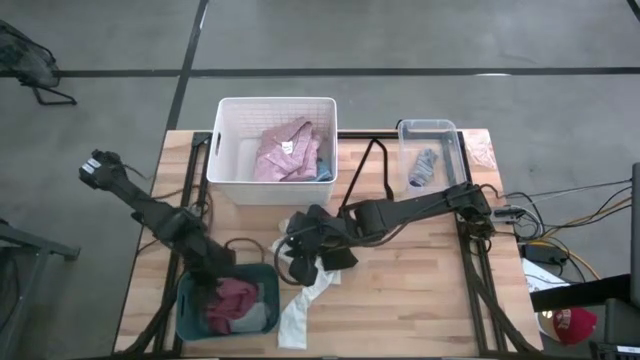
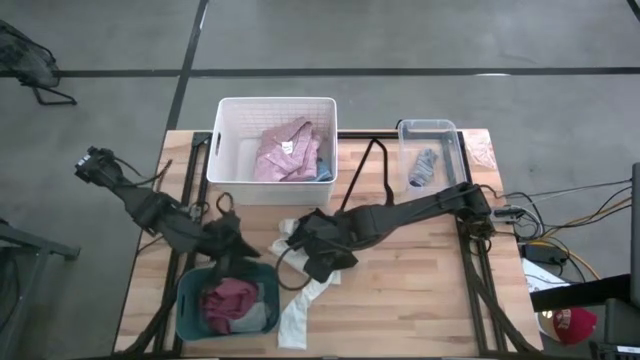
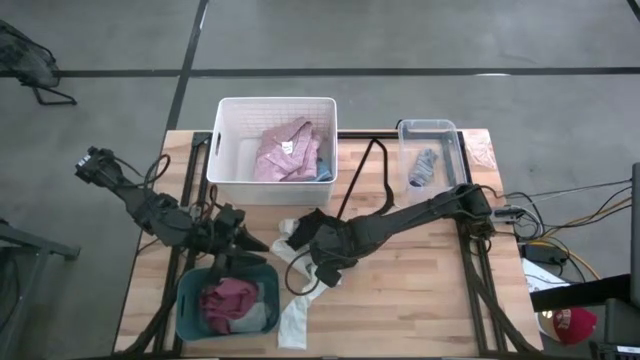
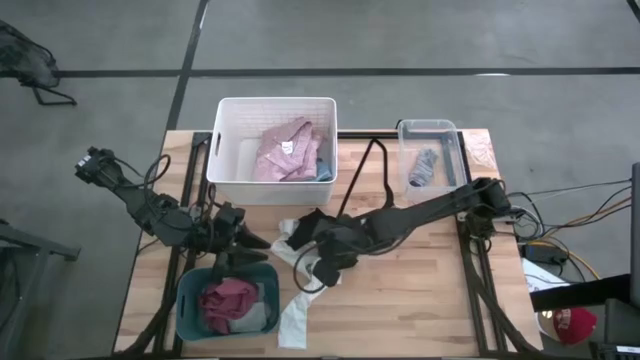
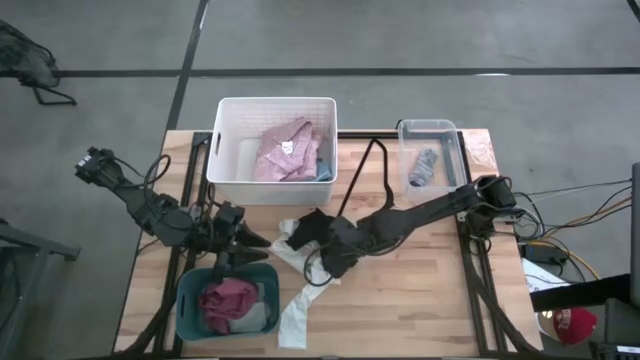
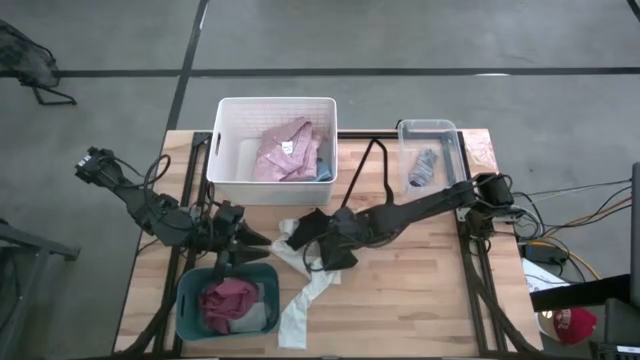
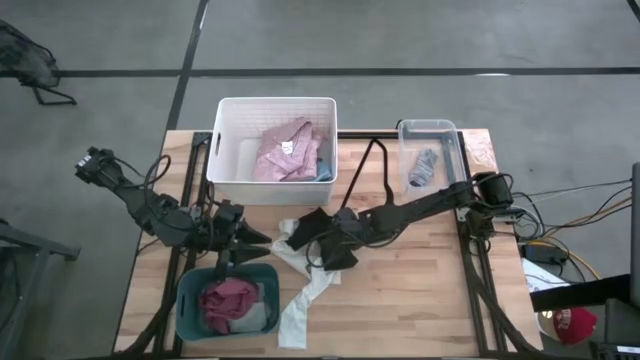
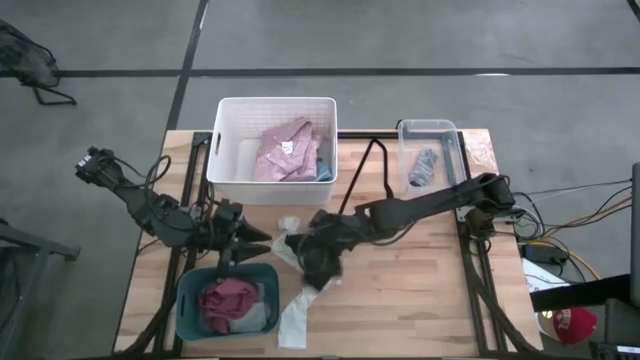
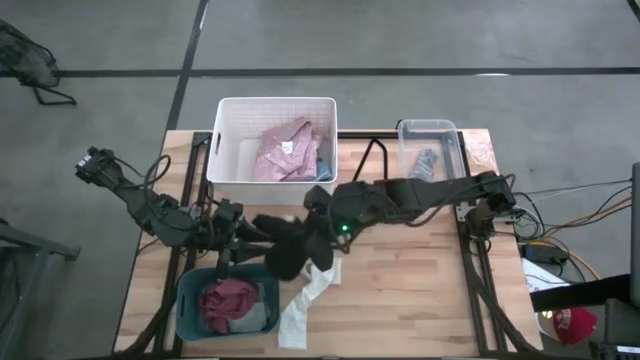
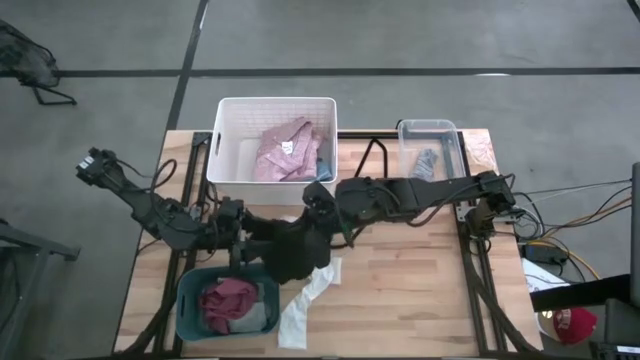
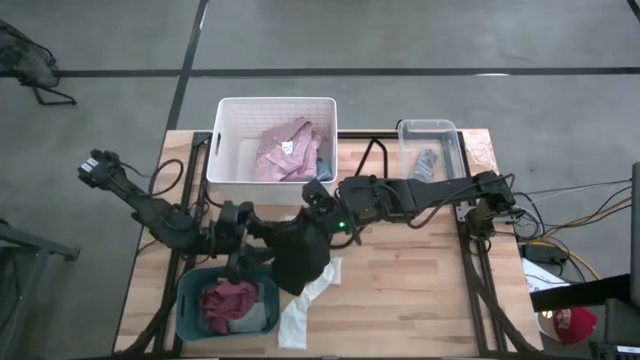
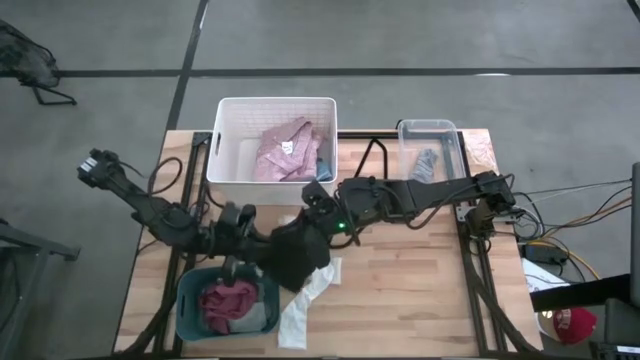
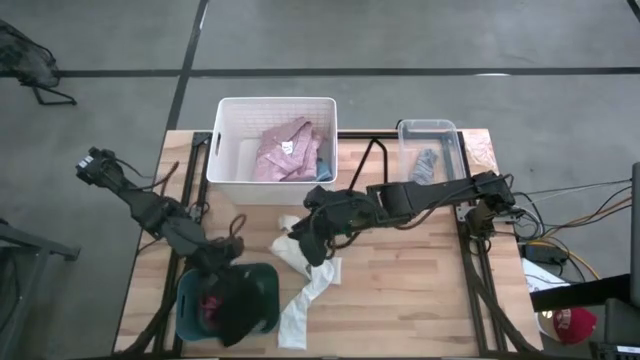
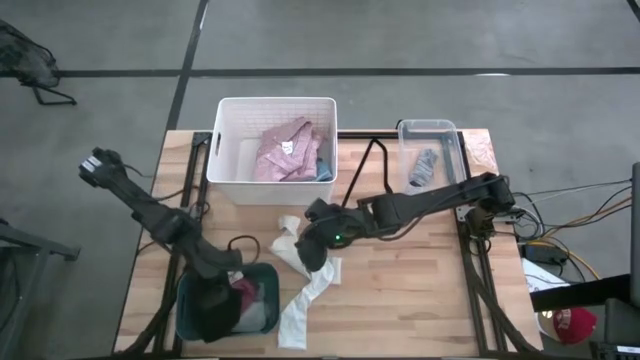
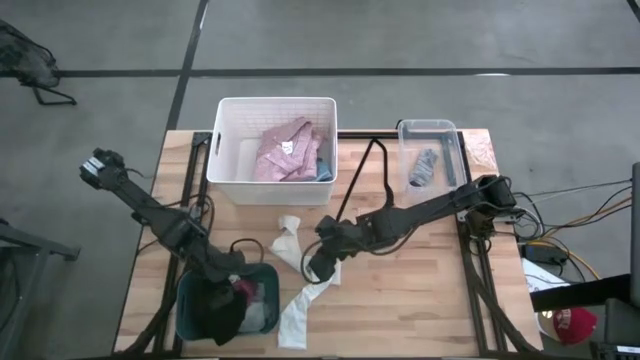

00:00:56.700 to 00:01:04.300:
Task: Pick & Place Cloths
Put the black boxer into the blue bin

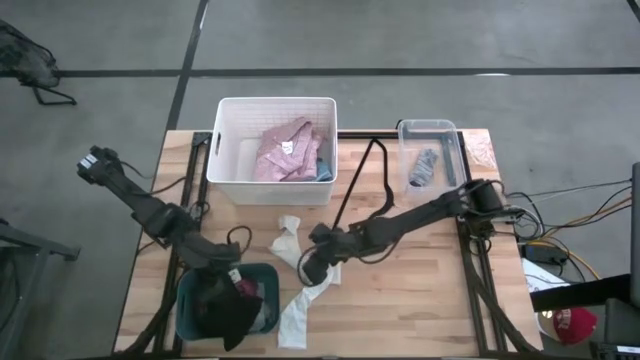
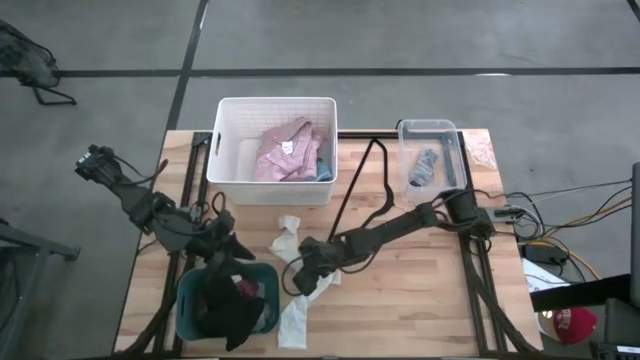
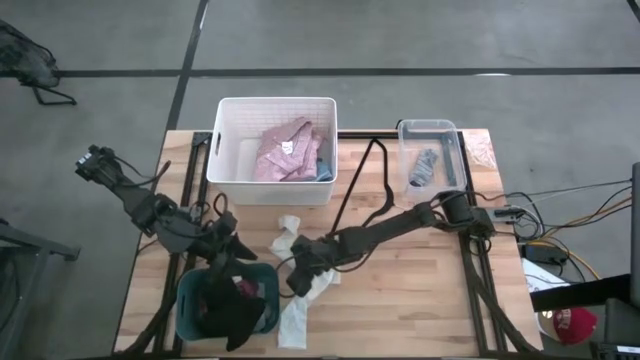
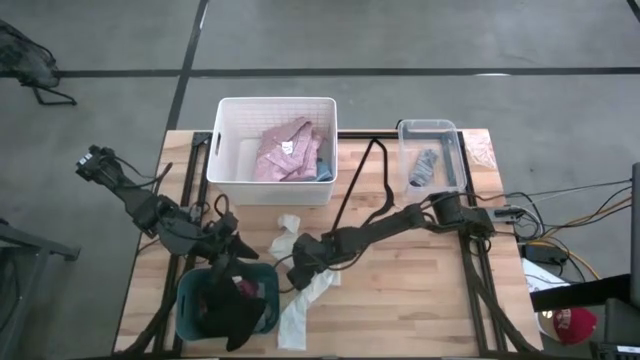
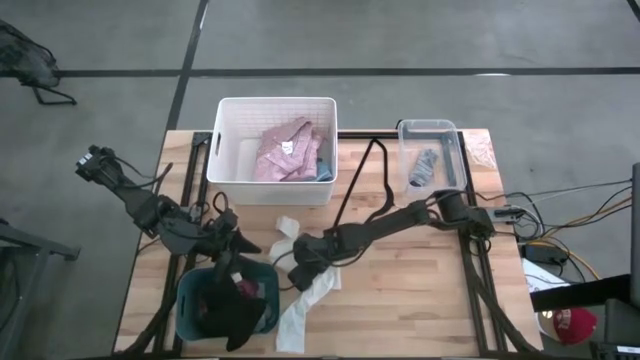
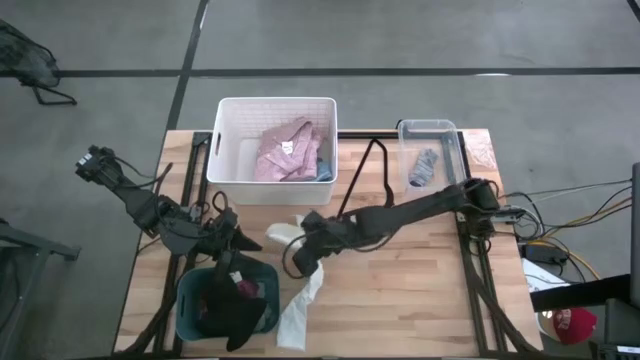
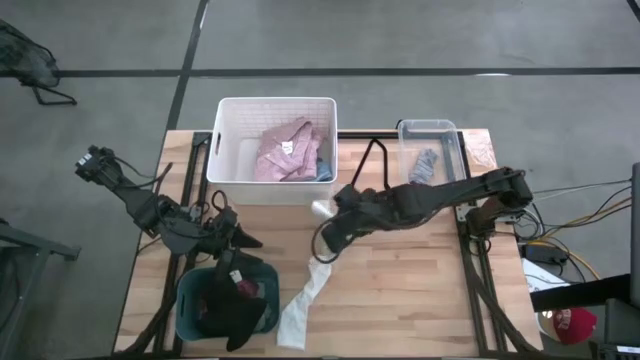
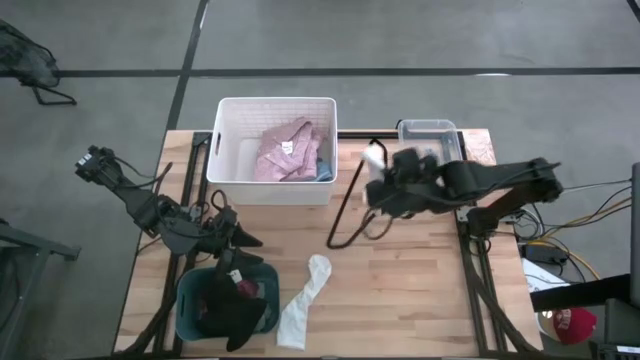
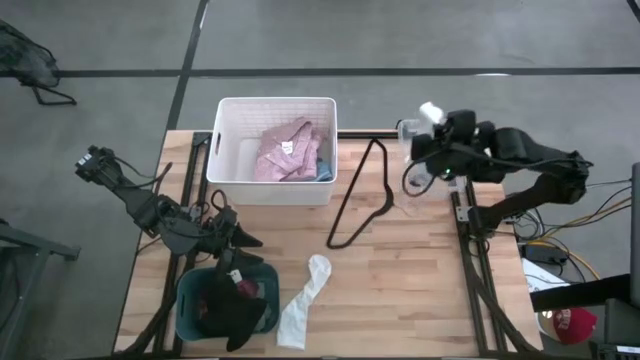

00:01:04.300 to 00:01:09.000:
Put the white sock into the transparent bin

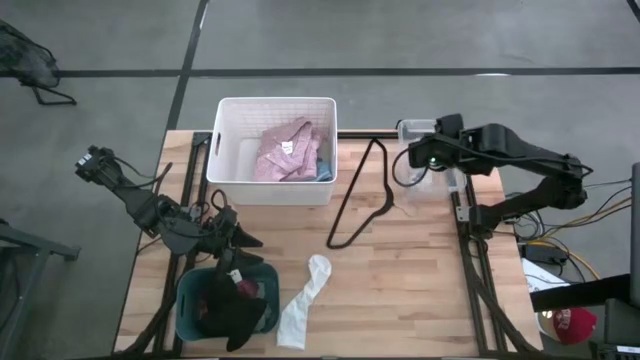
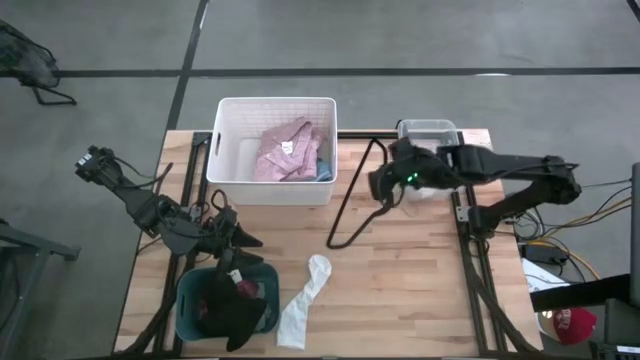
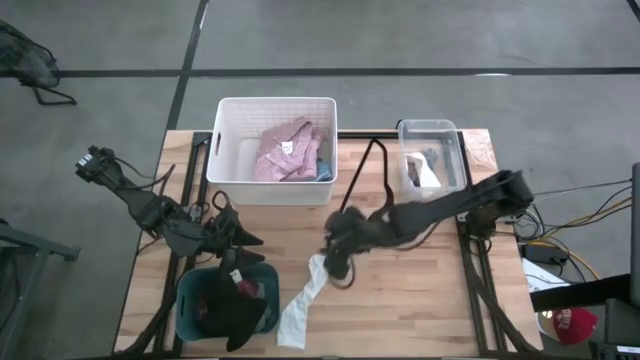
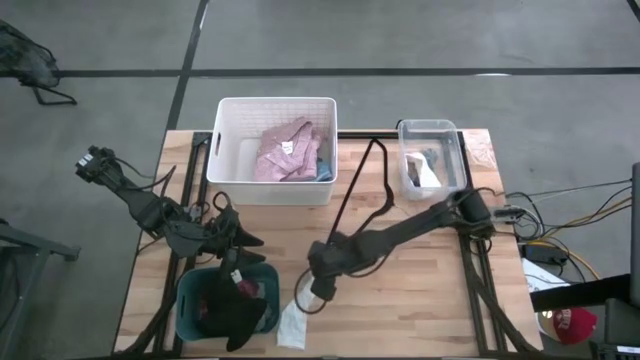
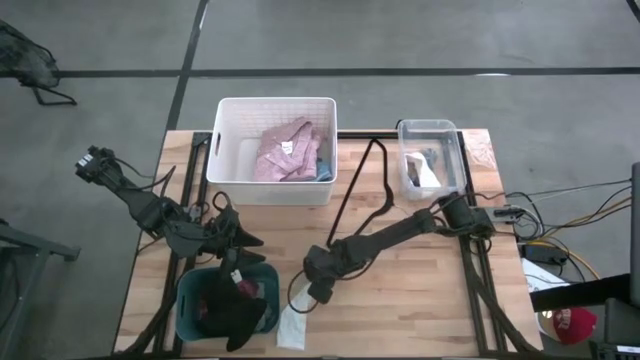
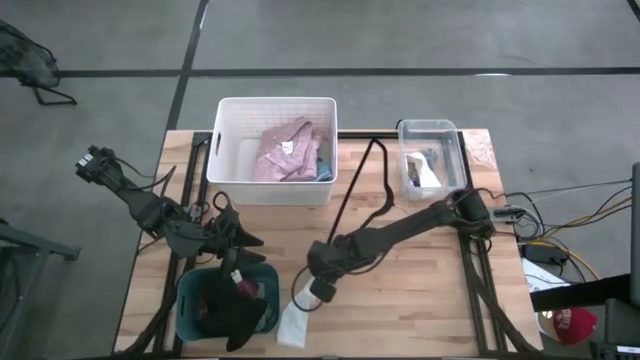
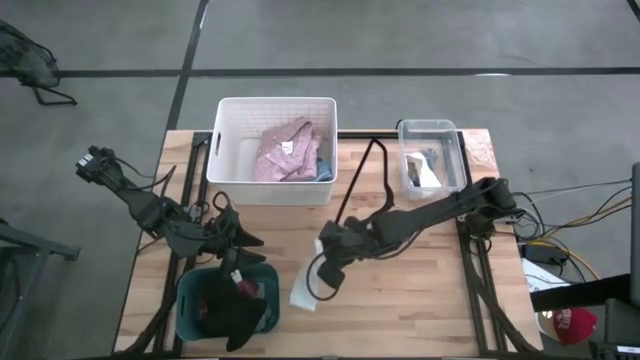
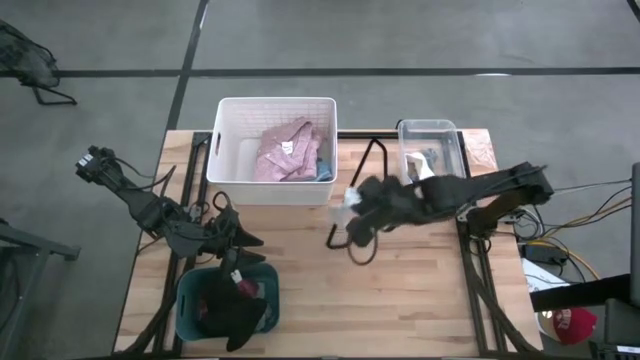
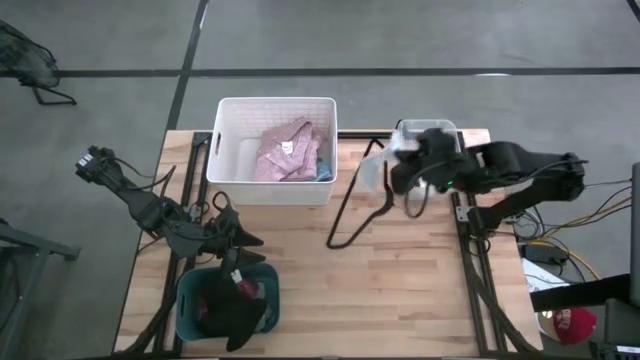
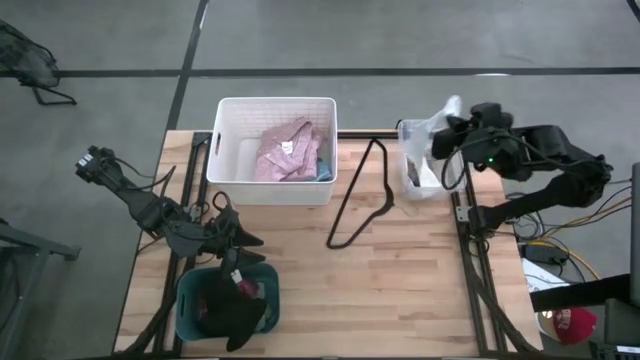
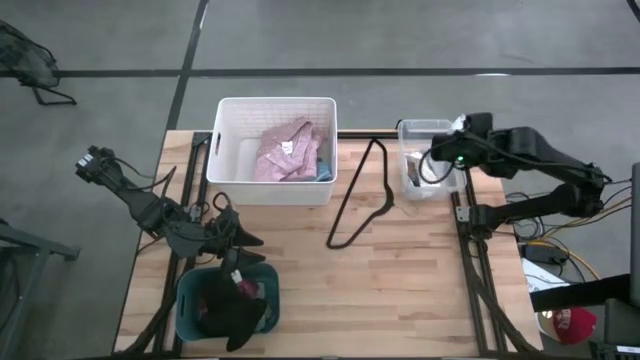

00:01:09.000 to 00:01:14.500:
Put the white sock into the transparent bin

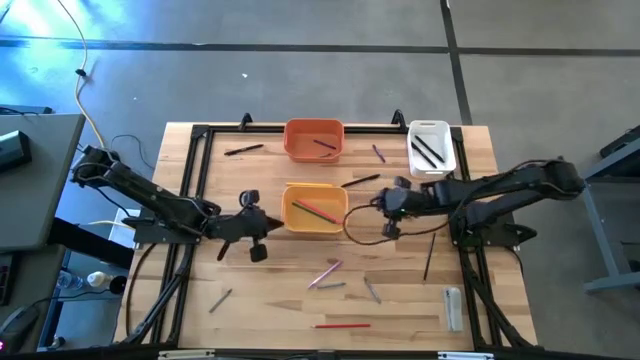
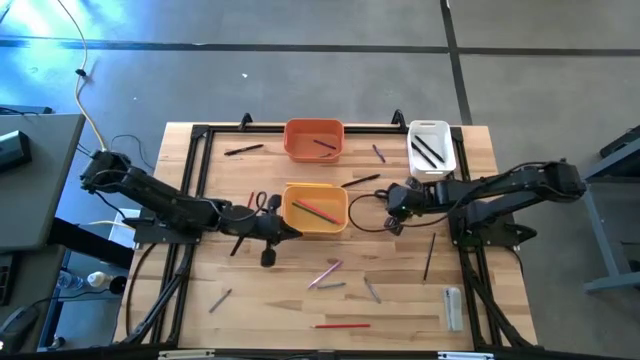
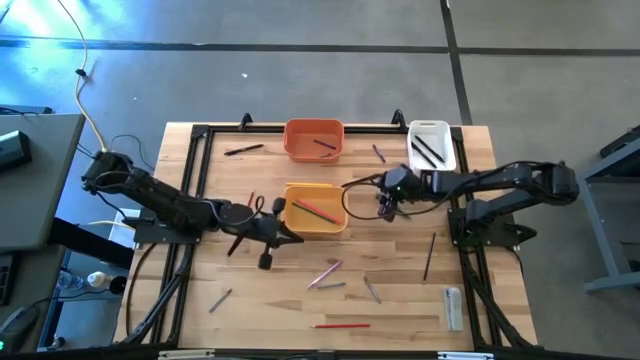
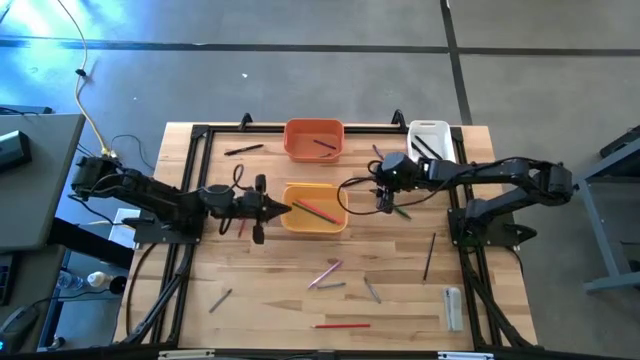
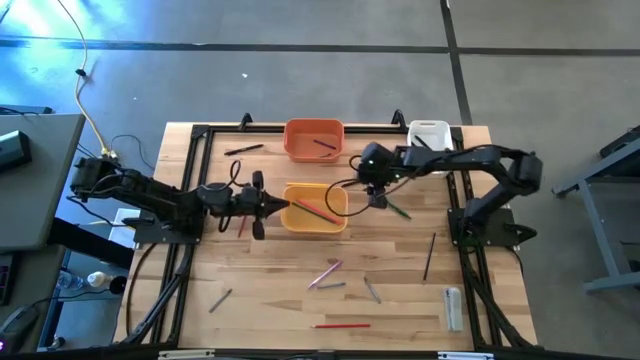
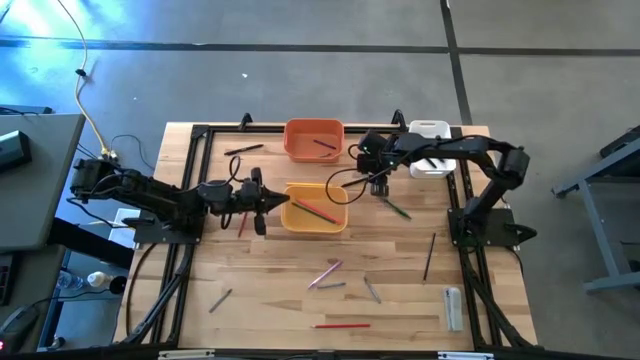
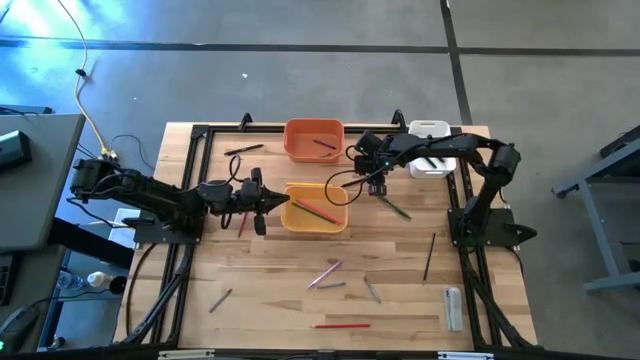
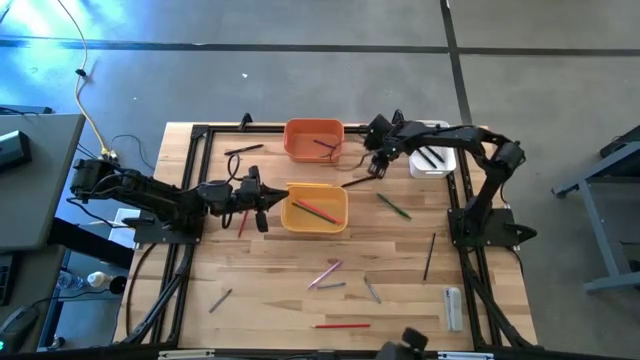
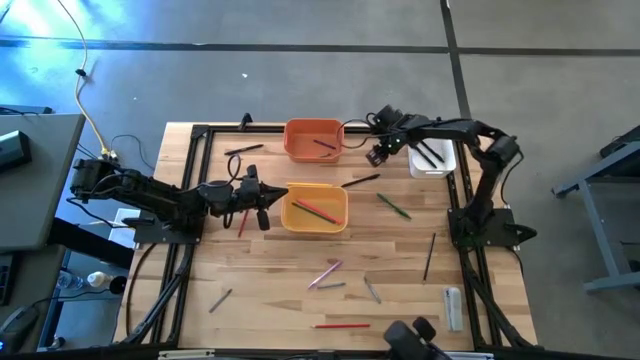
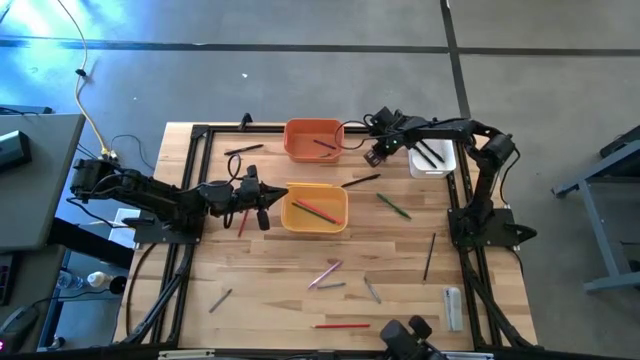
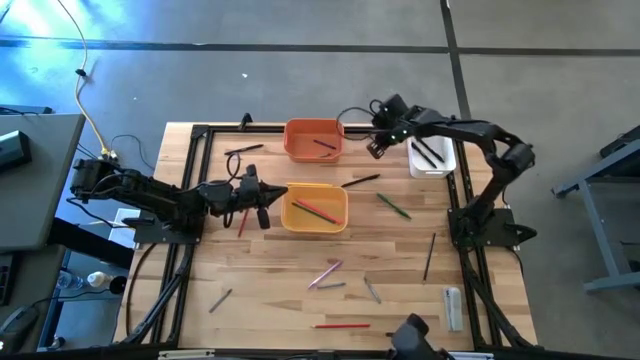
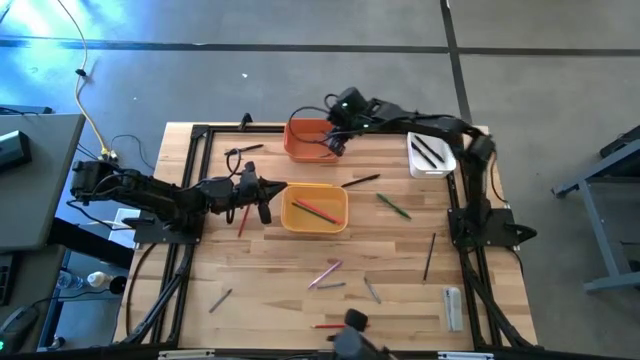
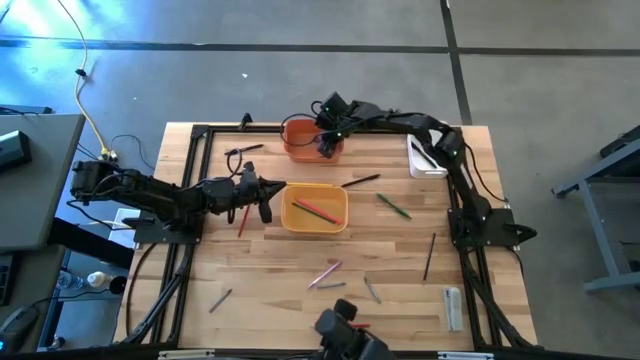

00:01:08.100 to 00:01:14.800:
Task: Sort crayons/erasers/pens/pencils in bins
Put the blue crayon into the orange bin
